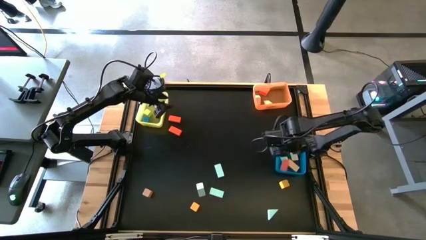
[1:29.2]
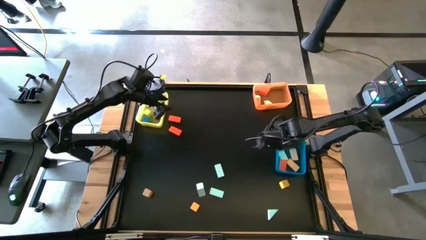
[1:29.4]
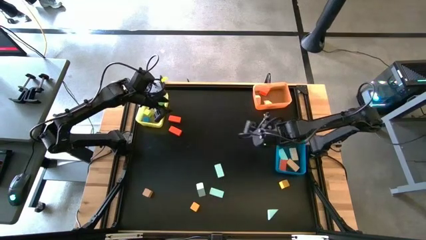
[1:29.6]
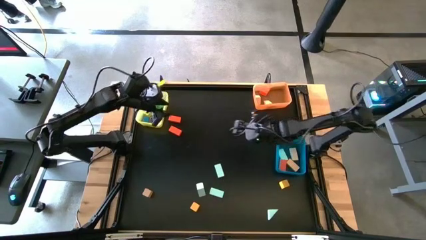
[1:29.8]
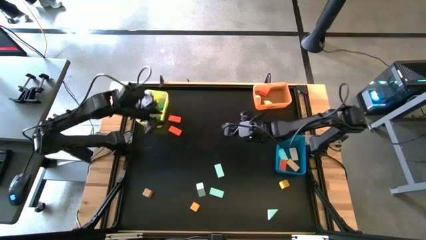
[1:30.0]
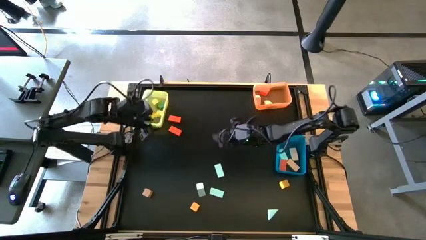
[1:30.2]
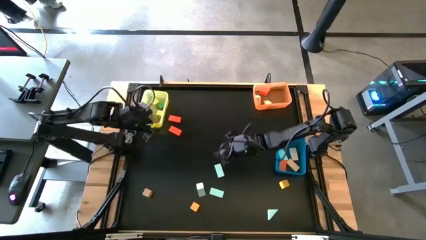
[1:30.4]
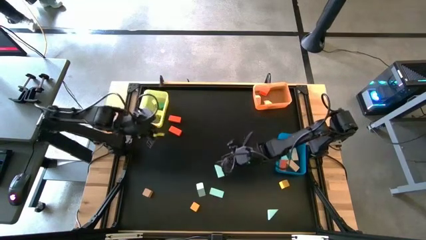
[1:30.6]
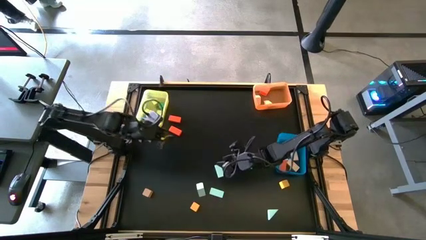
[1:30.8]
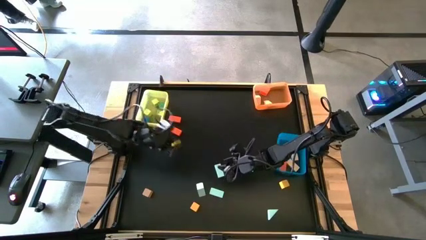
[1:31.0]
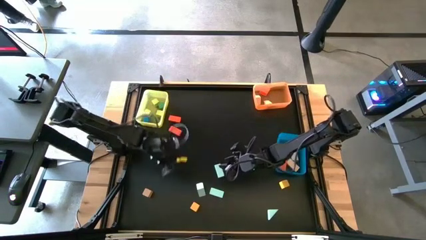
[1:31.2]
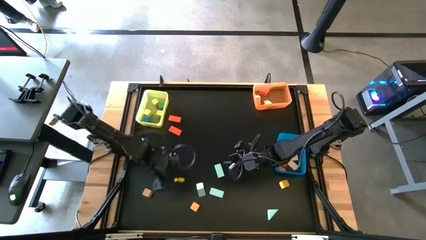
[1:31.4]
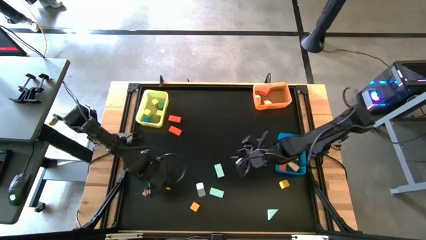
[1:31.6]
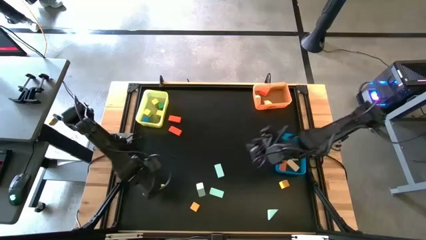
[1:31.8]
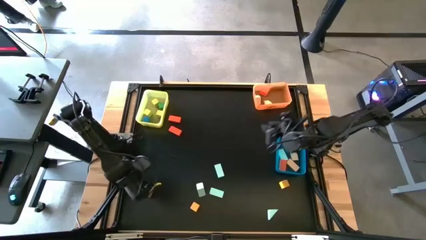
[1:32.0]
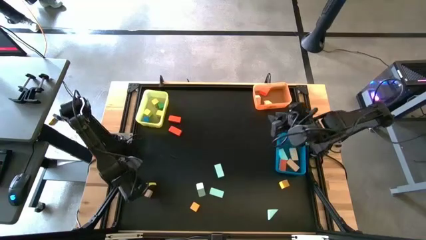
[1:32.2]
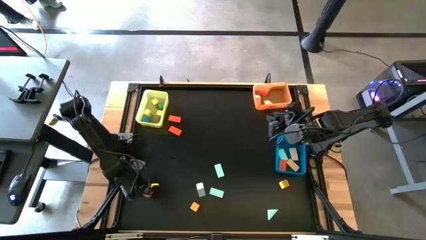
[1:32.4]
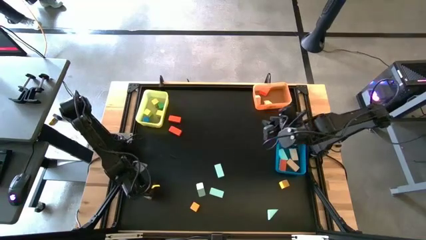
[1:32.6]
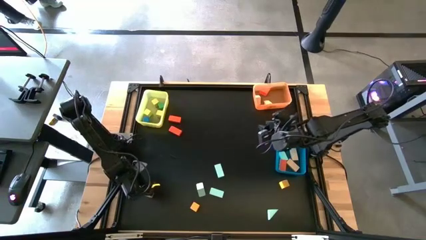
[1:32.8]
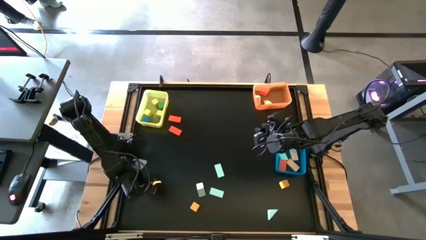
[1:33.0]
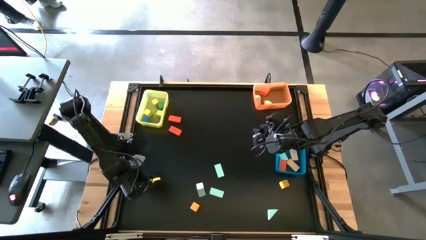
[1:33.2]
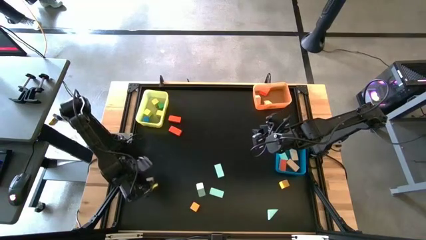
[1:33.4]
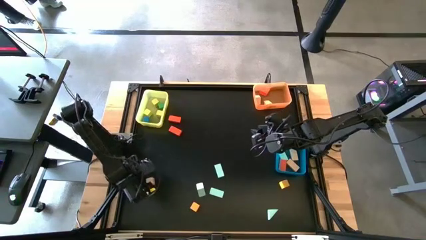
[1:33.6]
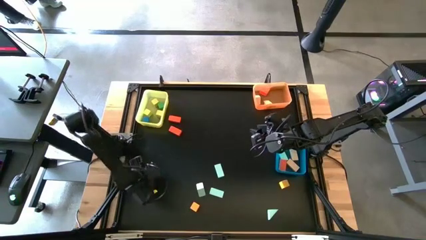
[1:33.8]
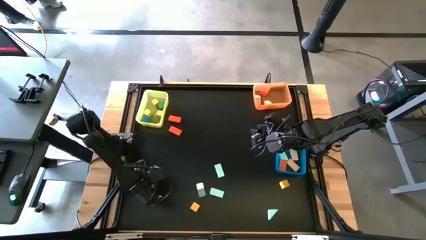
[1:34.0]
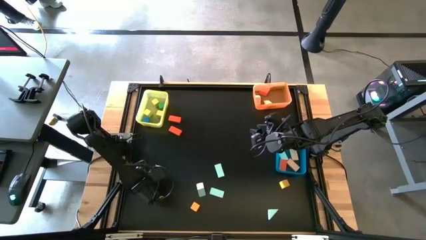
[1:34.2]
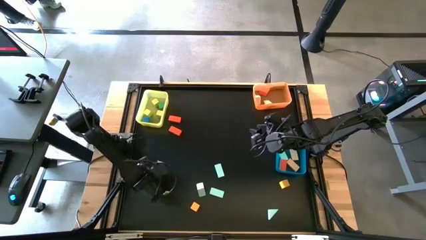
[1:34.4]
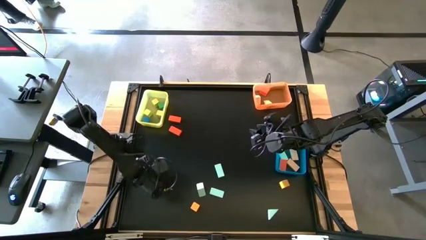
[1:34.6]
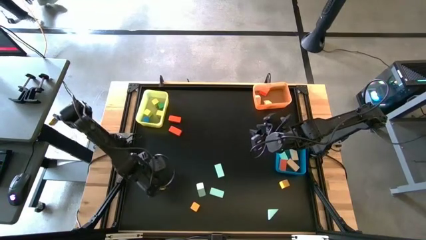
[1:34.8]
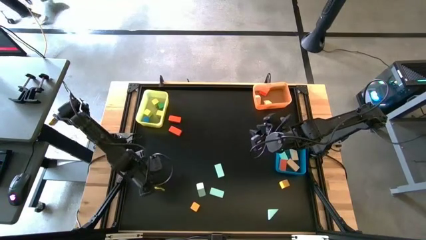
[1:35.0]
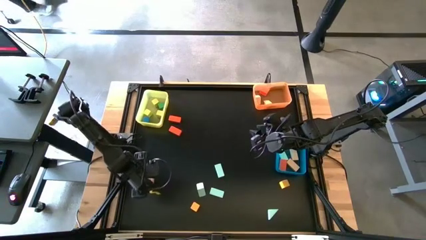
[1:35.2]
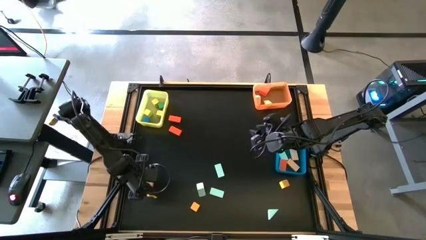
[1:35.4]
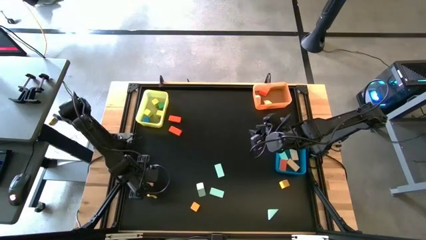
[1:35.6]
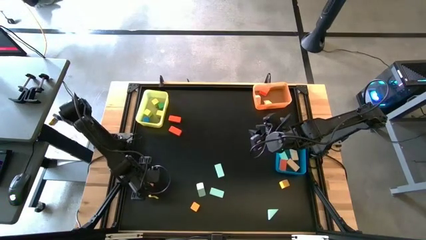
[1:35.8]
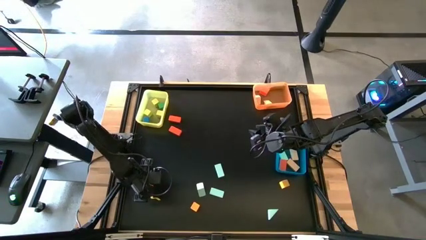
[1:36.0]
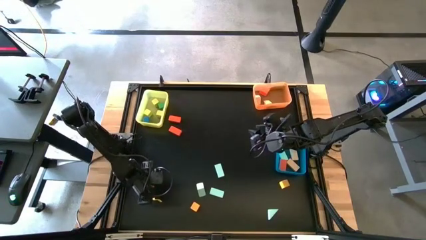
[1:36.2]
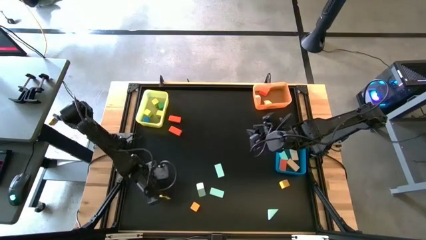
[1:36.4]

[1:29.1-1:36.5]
Task: Sort blocks by size
Put the pink square block into the yellow bin

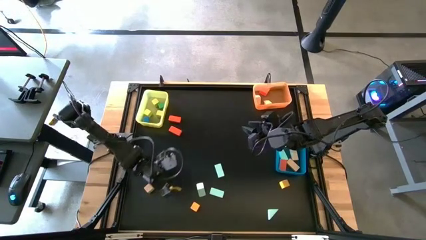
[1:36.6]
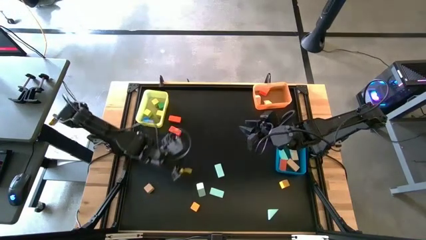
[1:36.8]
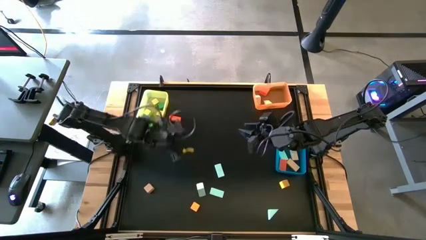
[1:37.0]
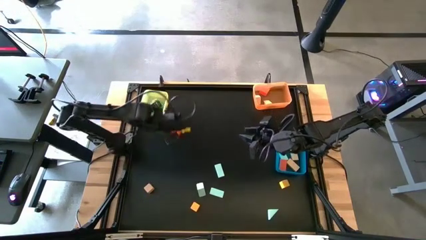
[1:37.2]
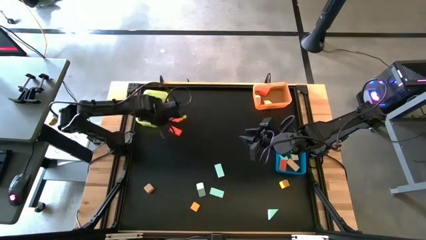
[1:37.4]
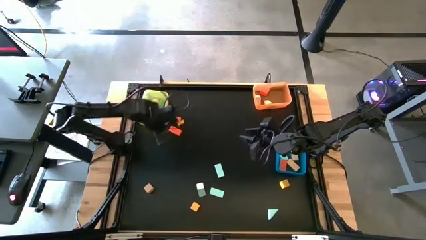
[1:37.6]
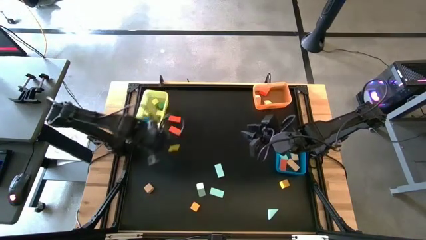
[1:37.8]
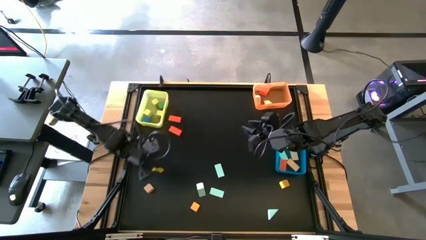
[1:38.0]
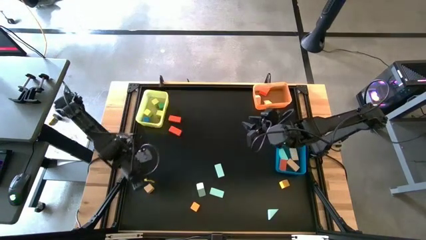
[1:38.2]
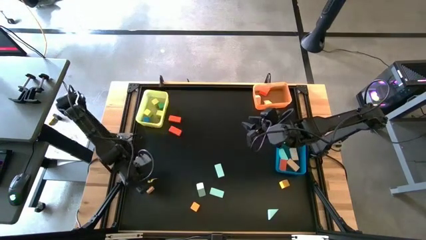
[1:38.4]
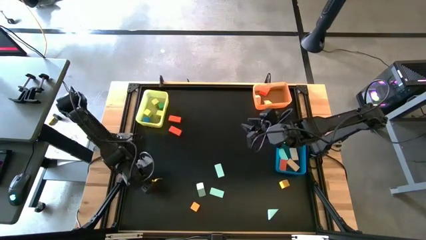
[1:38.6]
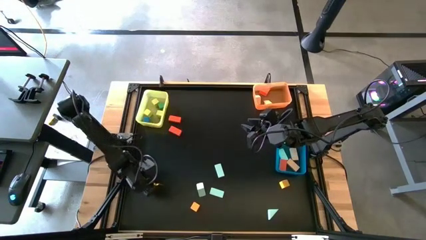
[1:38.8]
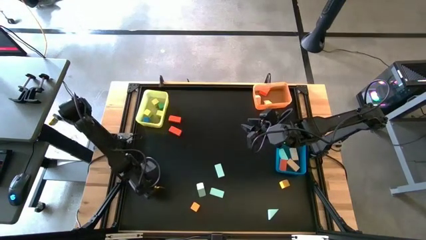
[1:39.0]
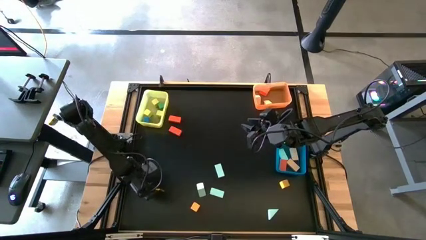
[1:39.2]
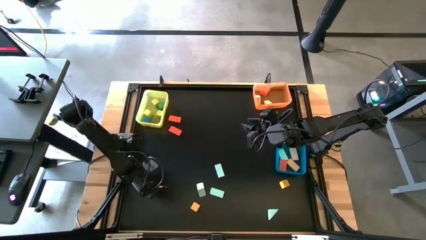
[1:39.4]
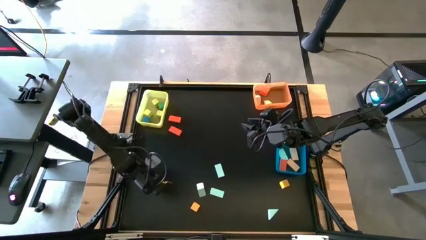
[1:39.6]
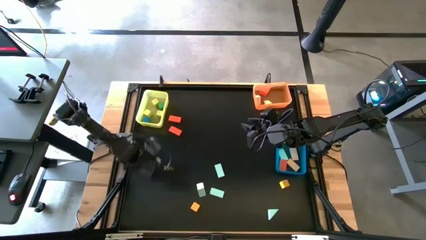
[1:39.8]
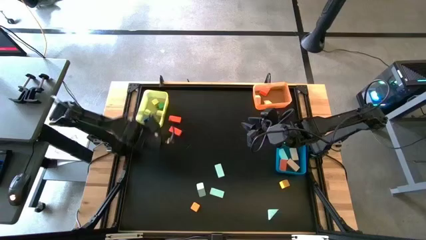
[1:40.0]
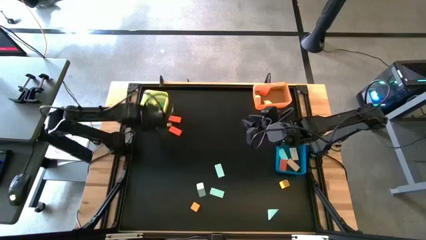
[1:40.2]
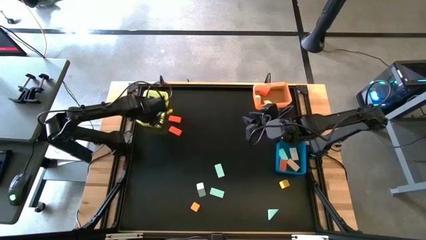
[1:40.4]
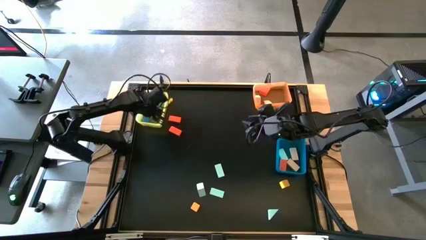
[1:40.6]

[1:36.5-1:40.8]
Put the pink square block into the yellow bin

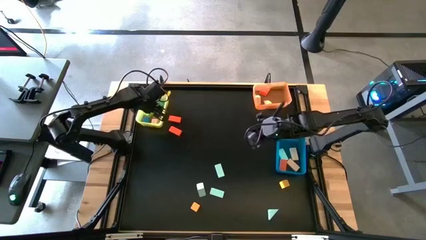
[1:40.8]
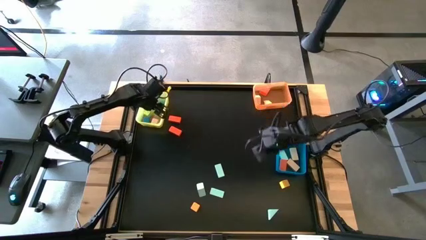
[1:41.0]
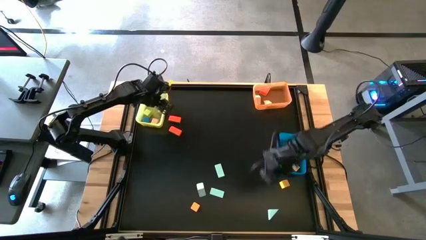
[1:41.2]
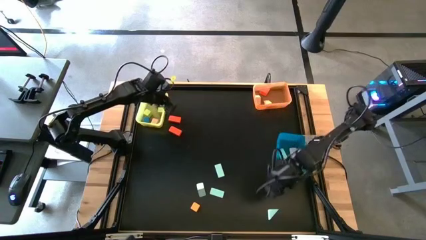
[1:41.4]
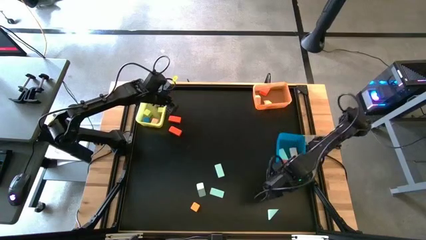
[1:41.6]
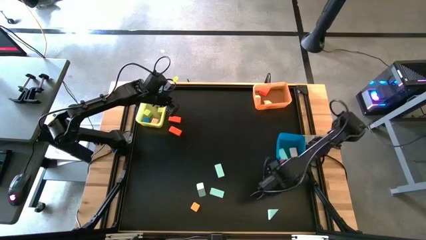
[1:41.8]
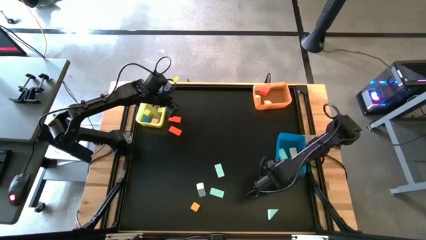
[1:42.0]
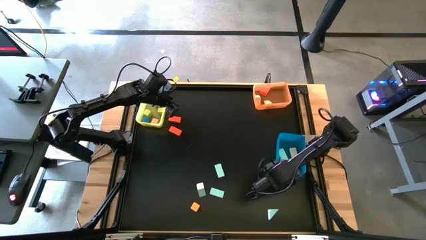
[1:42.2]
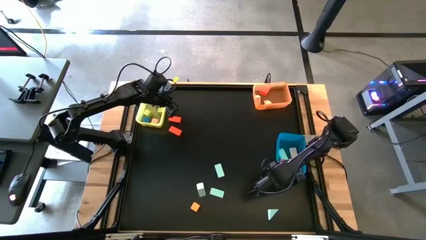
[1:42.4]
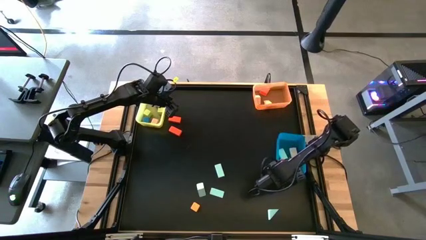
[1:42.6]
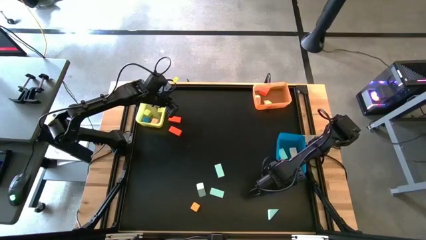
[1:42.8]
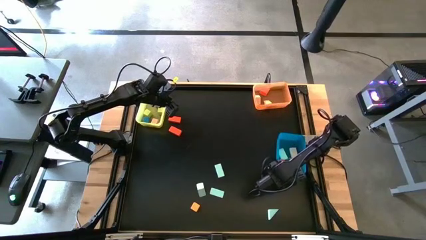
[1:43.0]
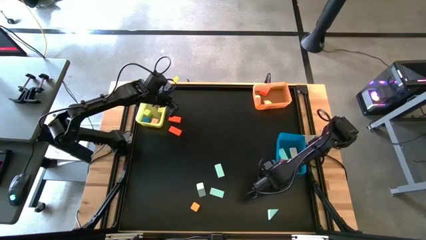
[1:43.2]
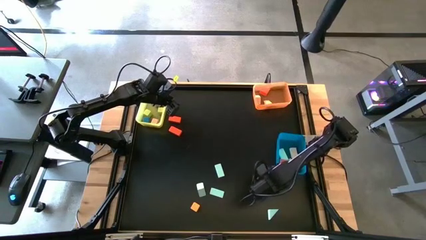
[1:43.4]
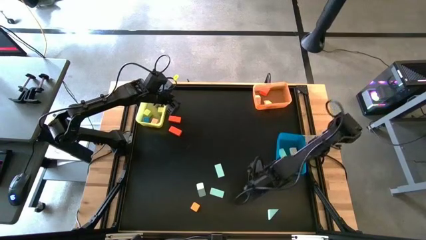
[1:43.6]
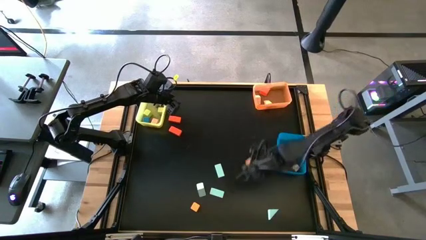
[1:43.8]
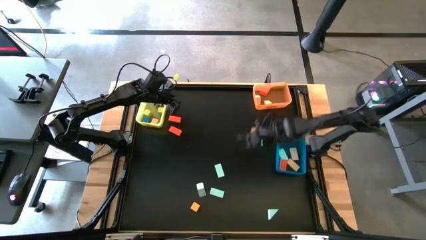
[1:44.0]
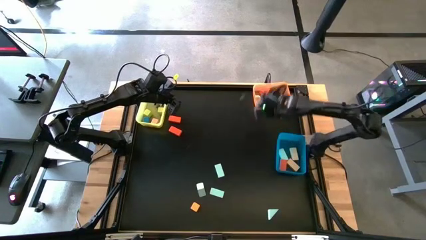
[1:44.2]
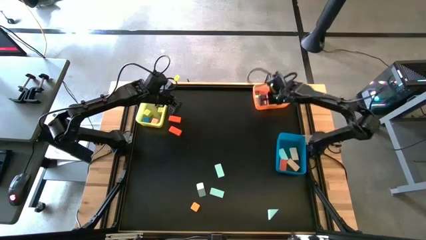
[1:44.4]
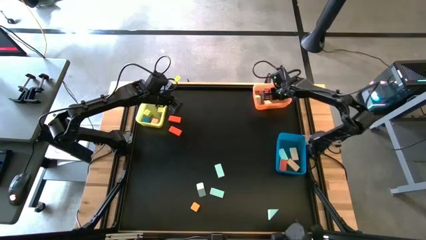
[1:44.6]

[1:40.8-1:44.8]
Put the yellow triangle block into the orange bin
